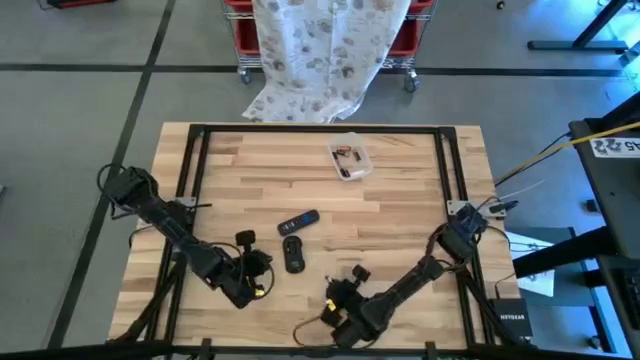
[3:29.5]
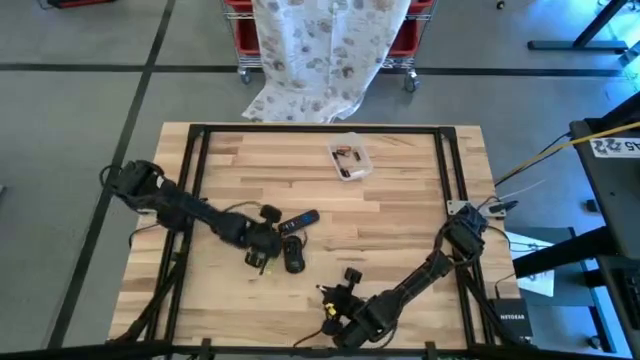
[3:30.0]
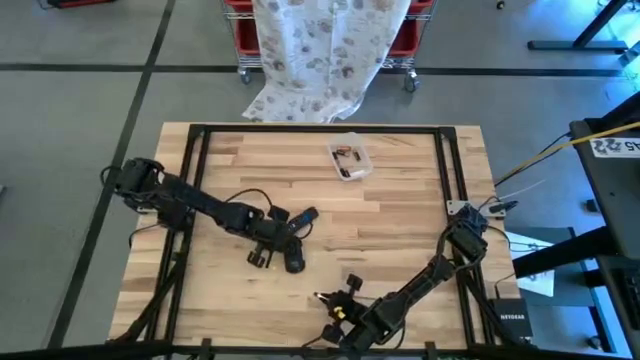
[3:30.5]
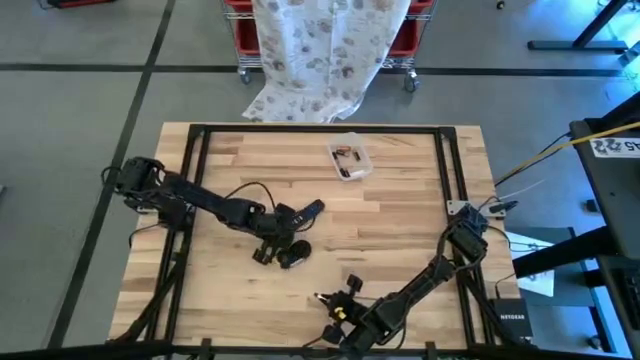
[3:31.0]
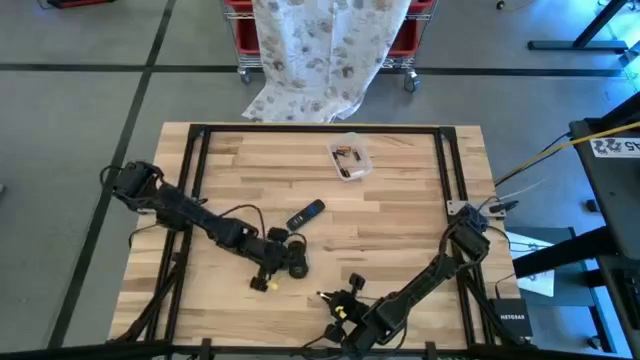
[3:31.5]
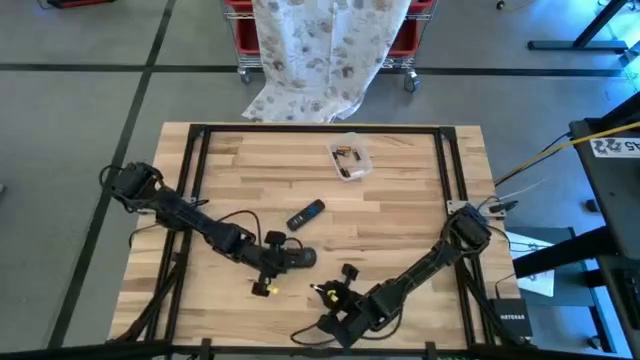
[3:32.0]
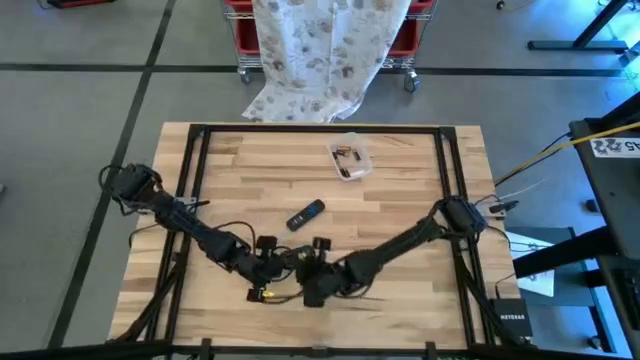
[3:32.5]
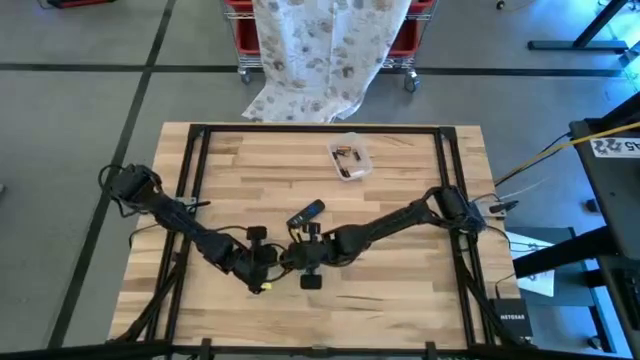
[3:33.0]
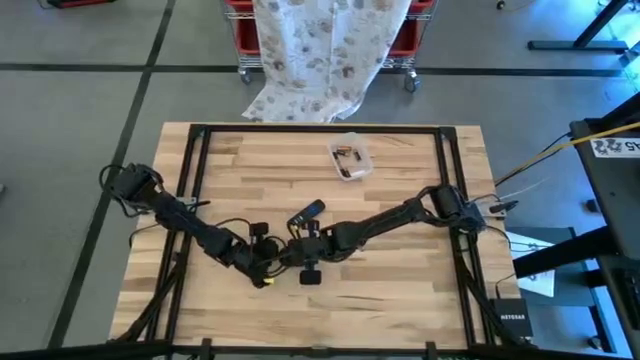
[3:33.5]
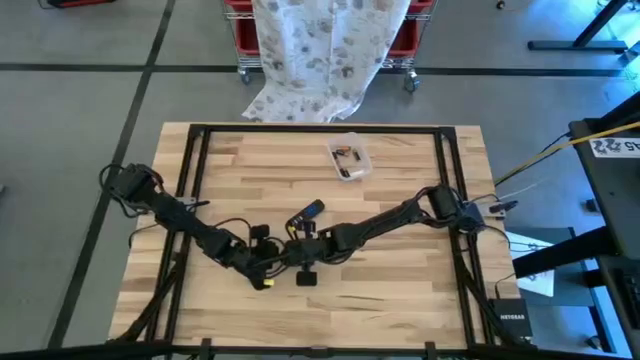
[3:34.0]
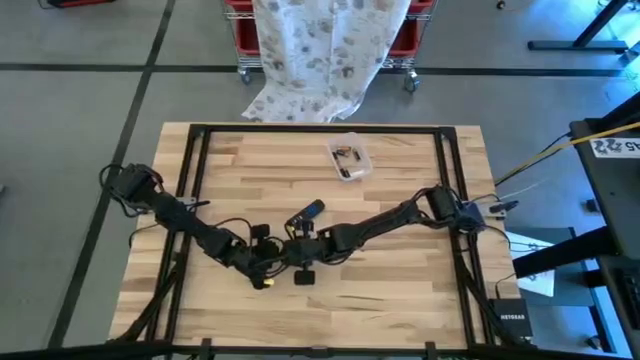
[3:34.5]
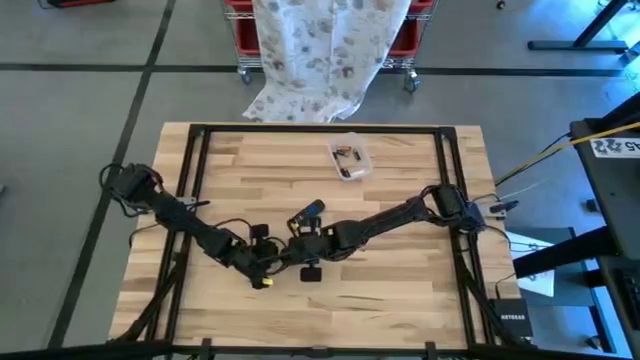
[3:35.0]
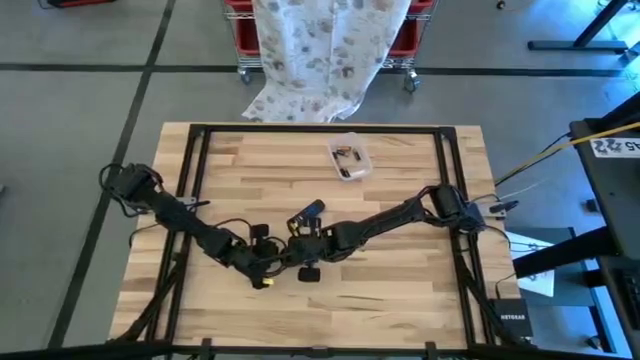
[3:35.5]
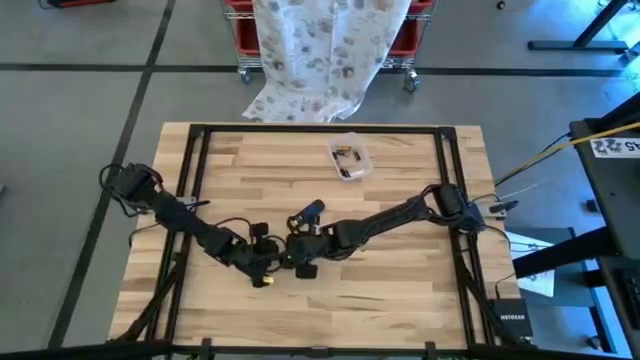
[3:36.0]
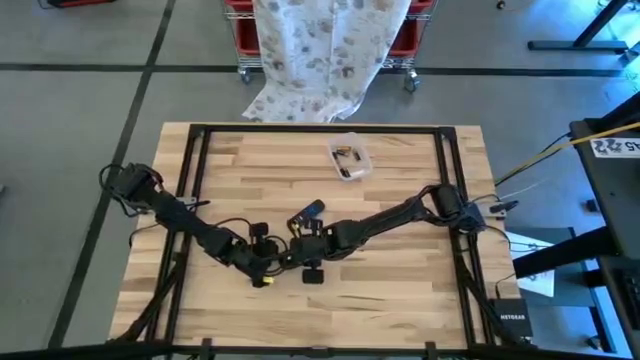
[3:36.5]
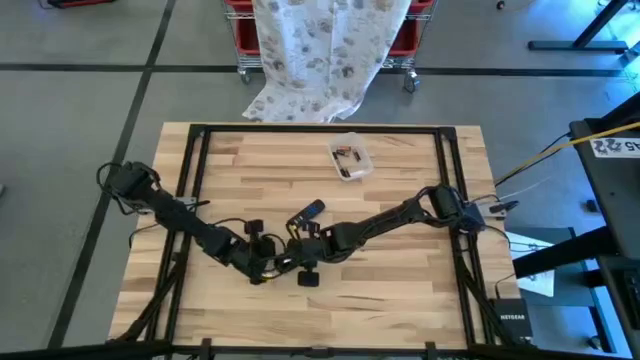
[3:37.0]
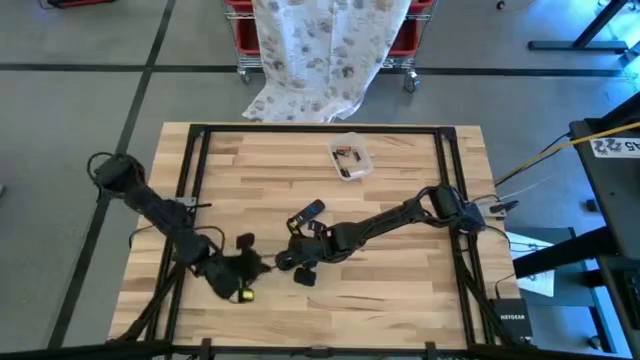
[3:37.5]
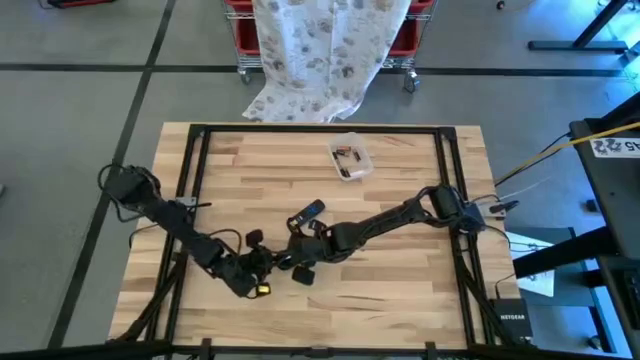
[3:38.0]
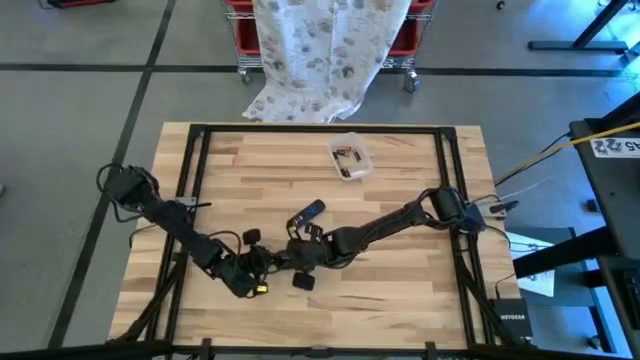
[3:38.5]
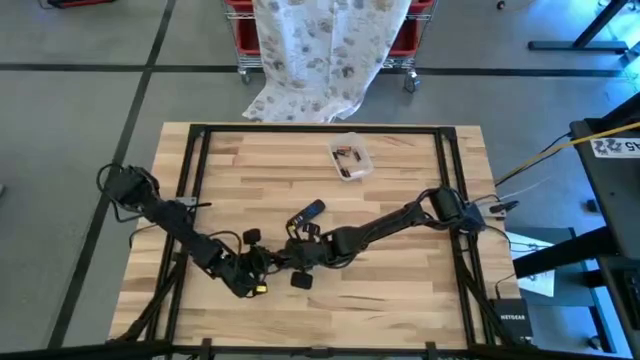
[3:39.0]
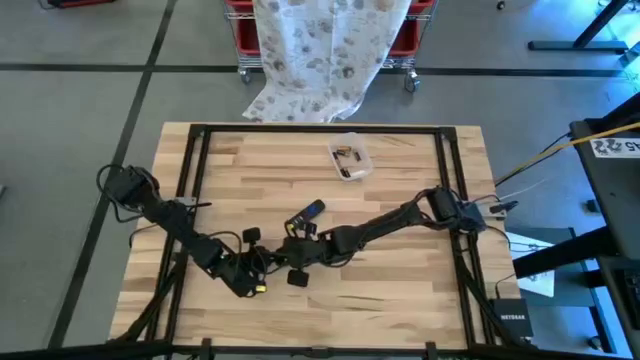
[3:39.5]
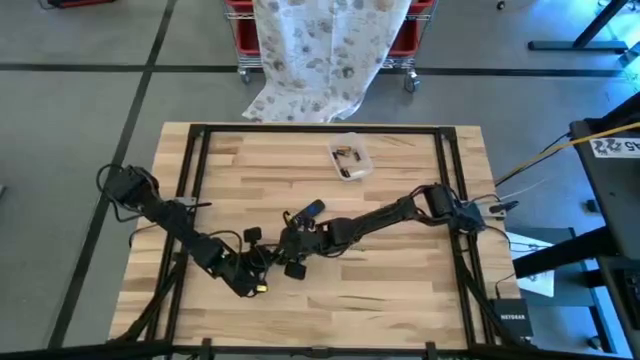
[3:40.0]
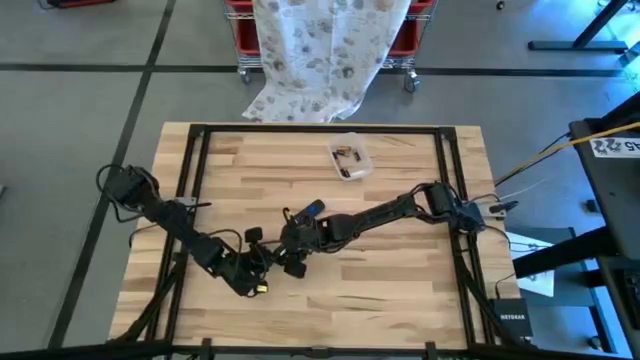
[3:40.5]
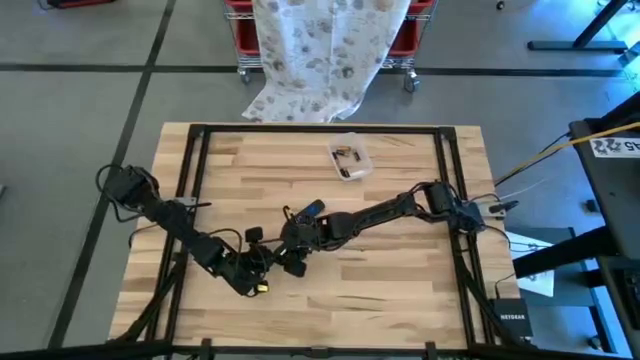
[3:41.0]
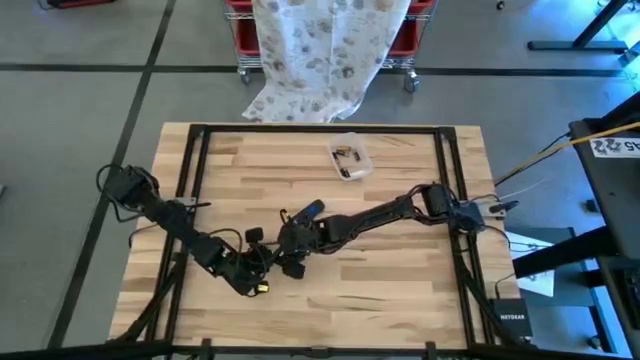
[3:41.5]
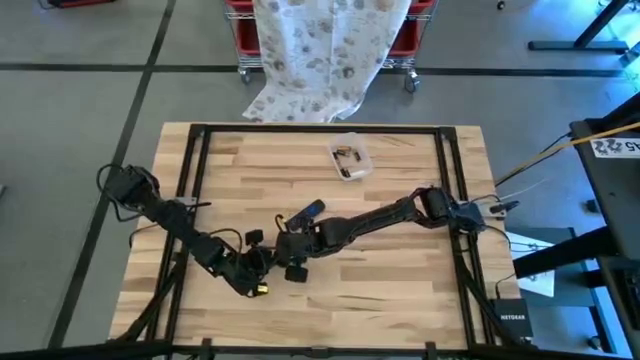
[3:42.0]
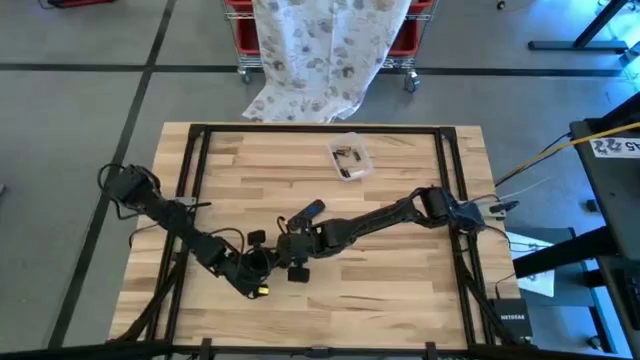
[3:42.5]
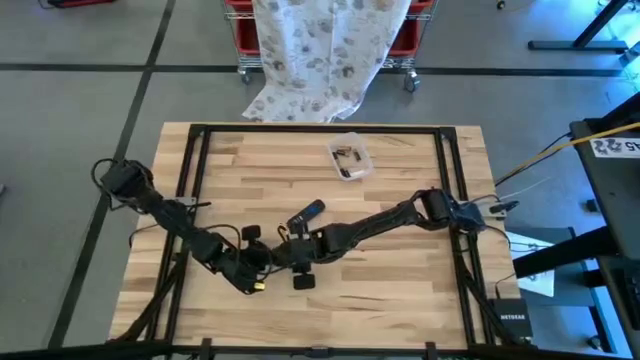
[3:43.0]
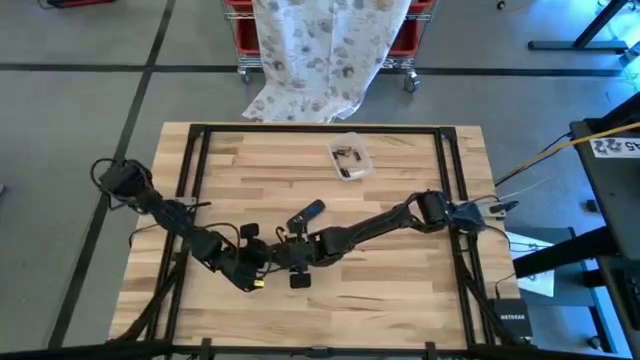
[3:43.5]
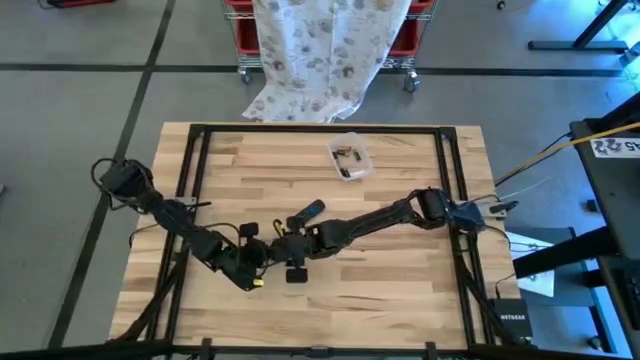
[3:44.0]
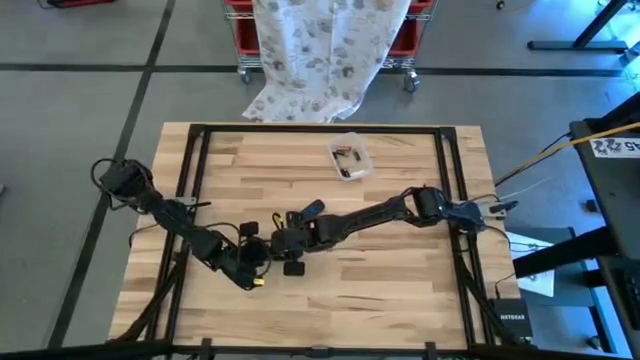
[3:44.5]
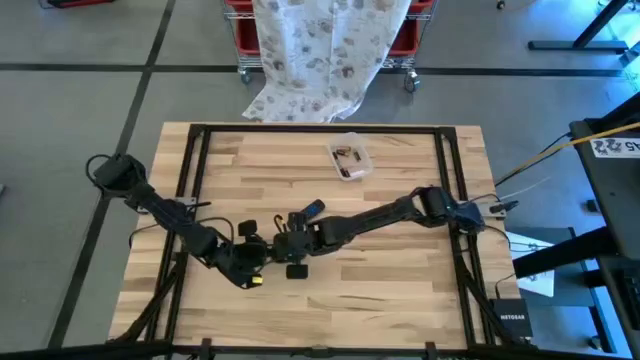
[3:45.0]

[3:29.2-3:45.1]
Task: Insert battery
Insert the white battery into the wireless mouse

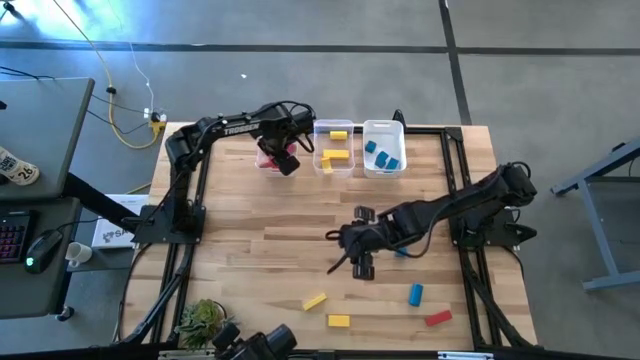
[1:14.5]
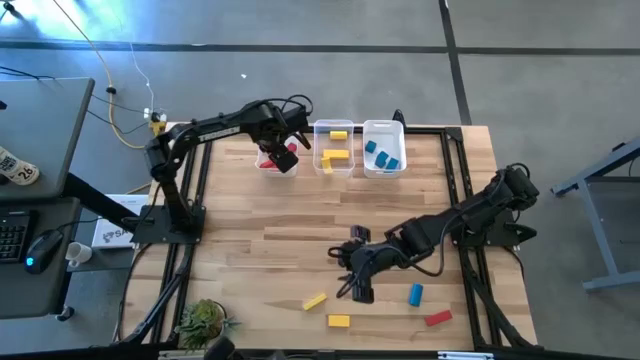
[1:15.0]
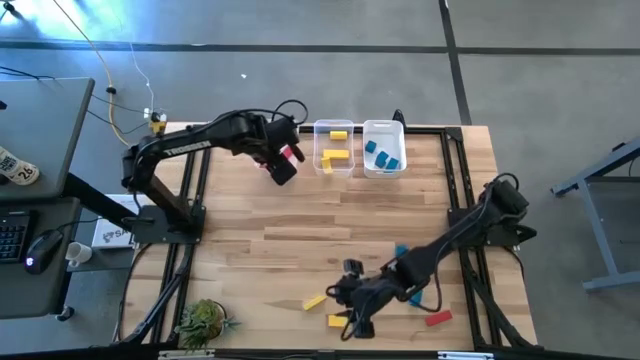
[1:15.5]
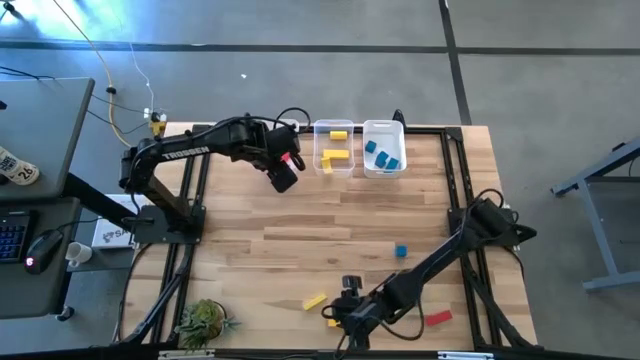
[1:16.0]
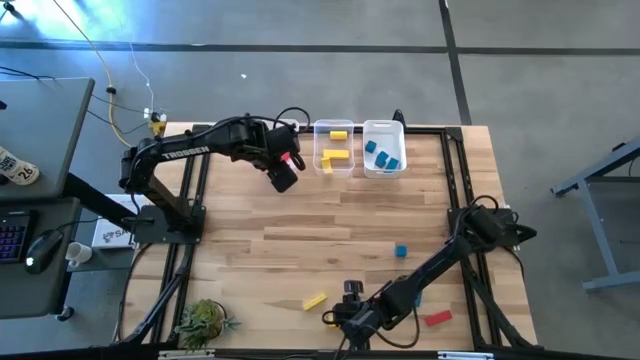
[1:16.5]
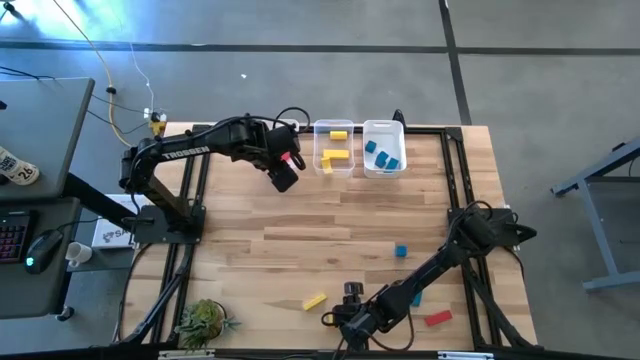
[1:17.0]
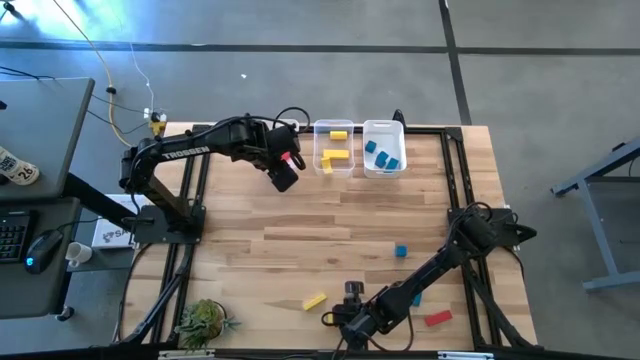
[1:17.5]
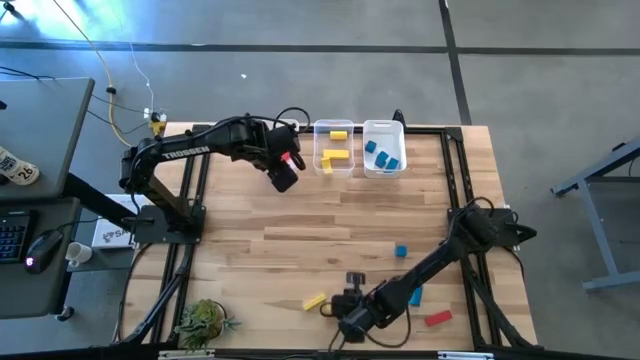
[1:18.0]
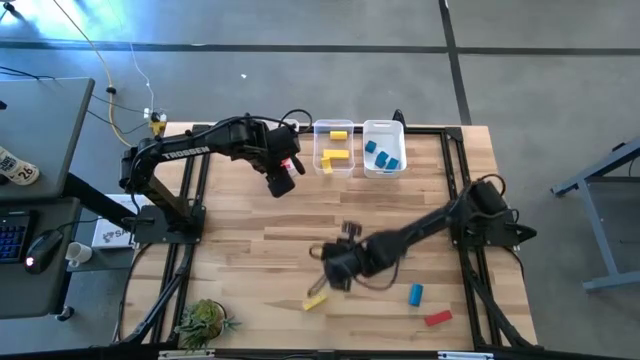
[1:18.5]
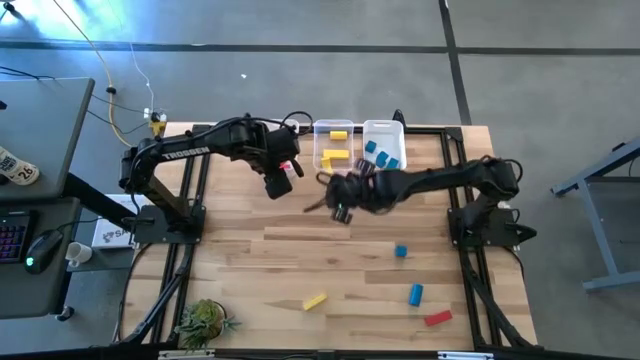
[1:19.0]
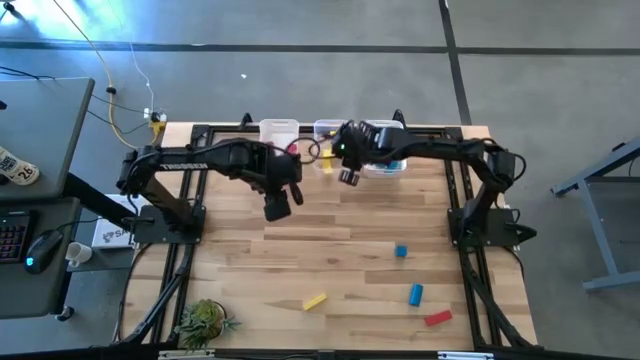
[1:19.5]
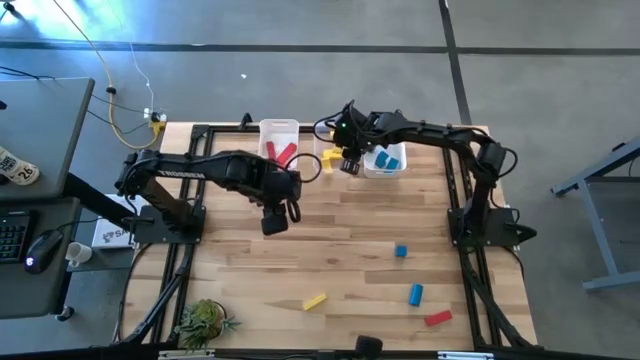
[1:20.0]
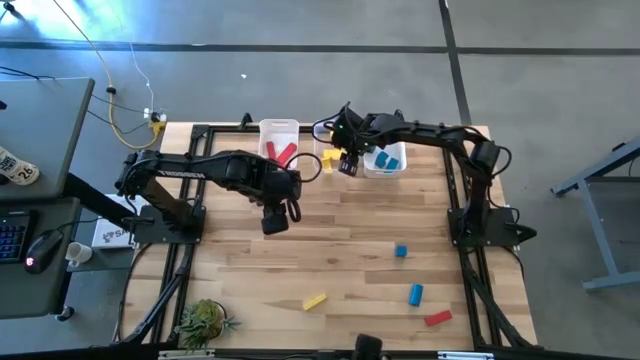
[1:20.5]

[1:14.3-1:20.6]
Task: Sort & place blocks by color
Put the yellow block into the transparent bin
